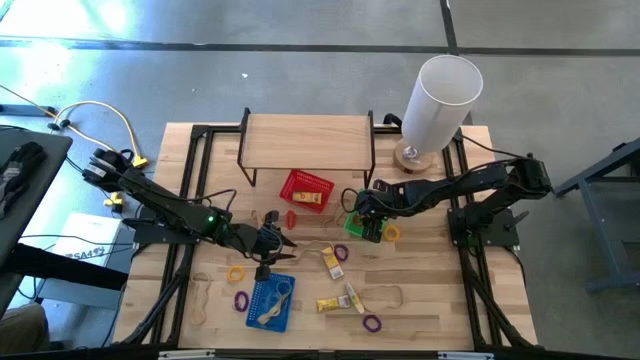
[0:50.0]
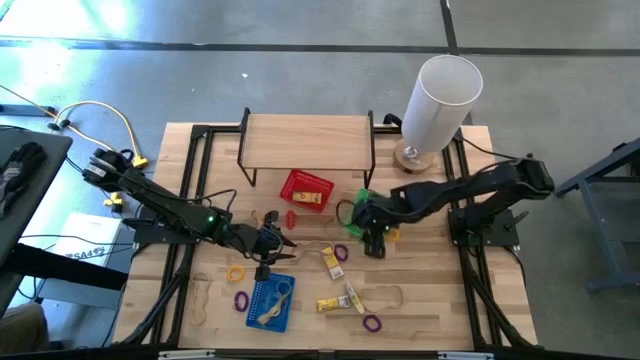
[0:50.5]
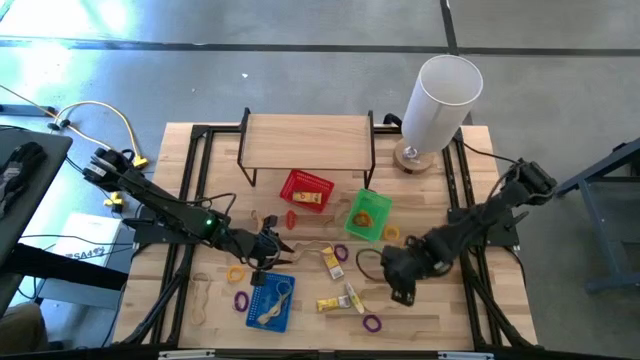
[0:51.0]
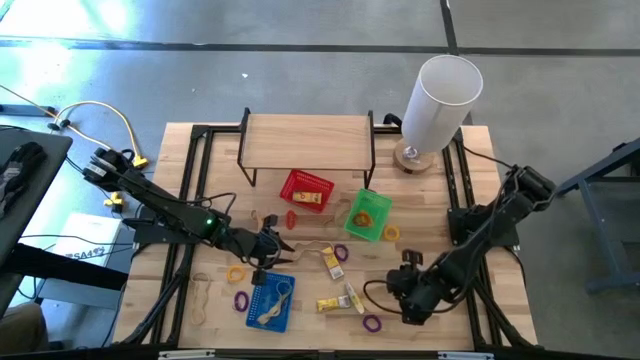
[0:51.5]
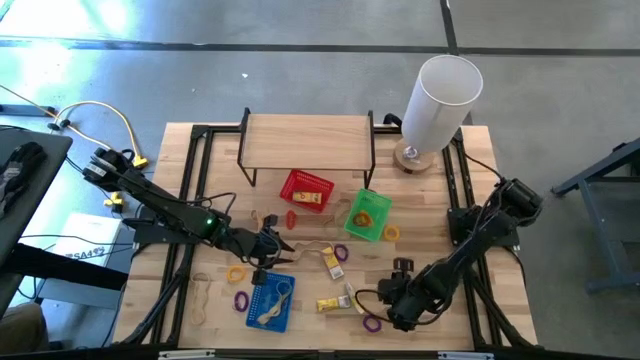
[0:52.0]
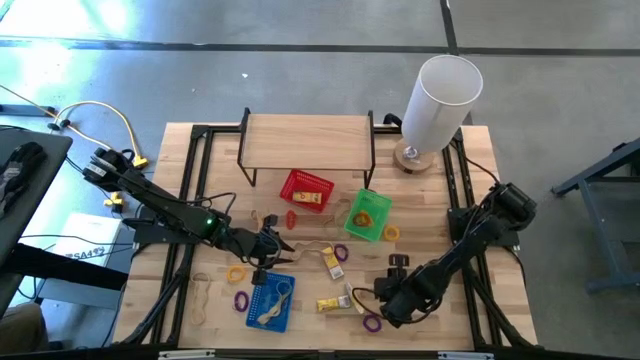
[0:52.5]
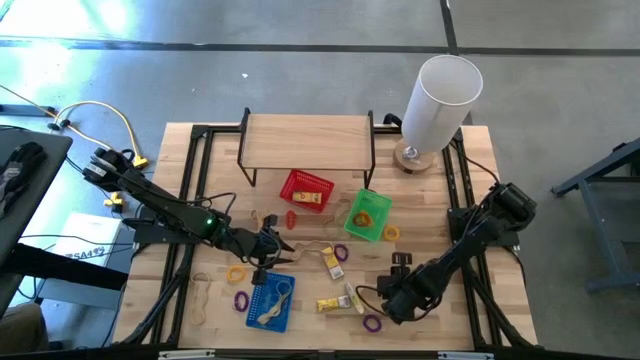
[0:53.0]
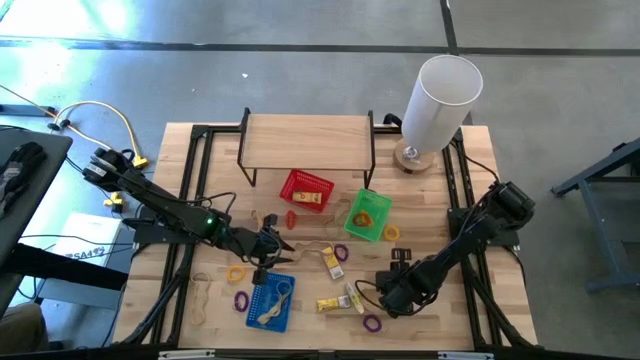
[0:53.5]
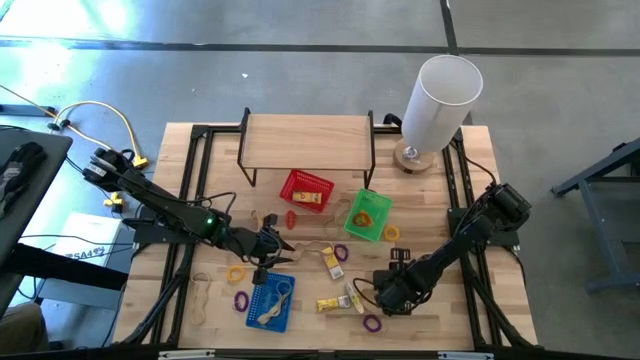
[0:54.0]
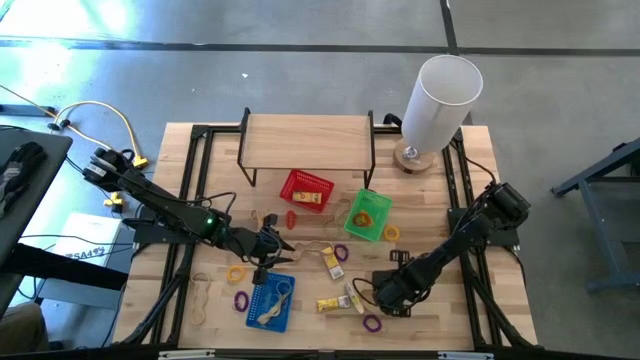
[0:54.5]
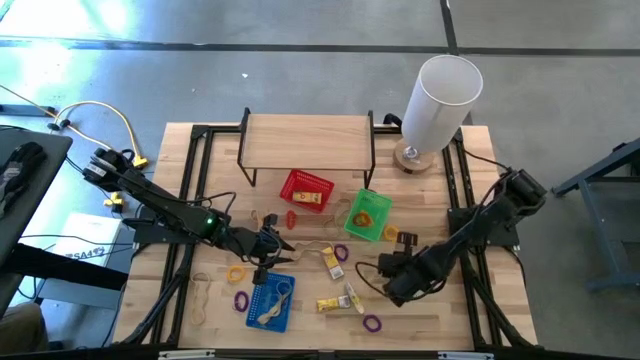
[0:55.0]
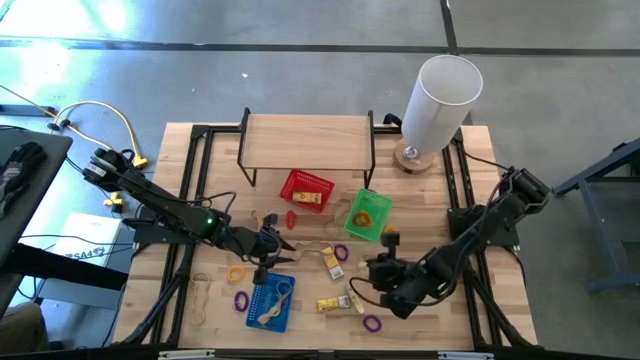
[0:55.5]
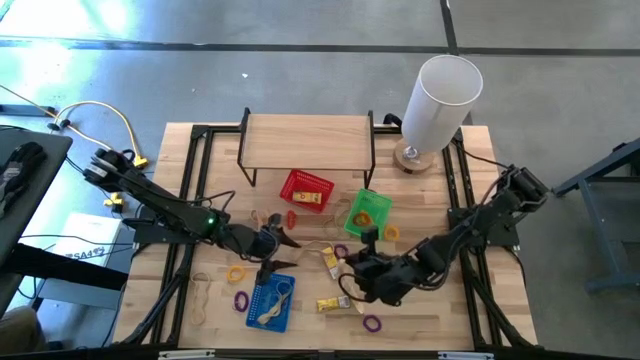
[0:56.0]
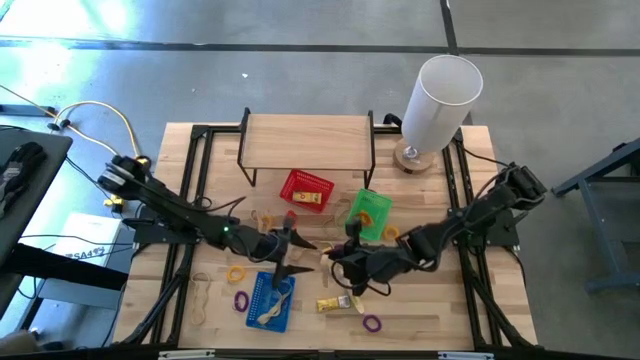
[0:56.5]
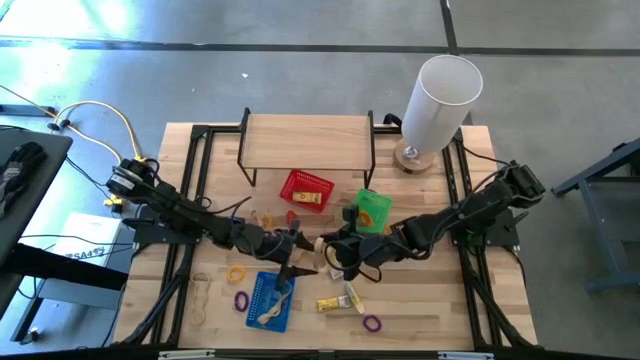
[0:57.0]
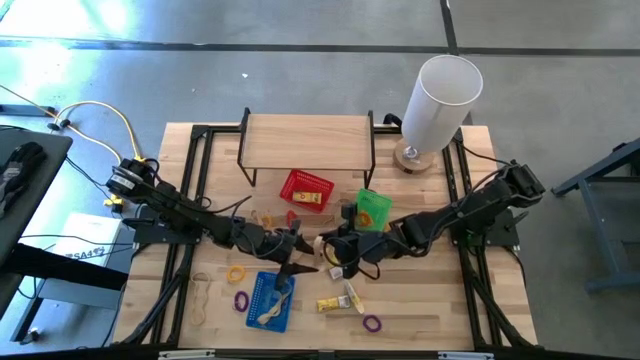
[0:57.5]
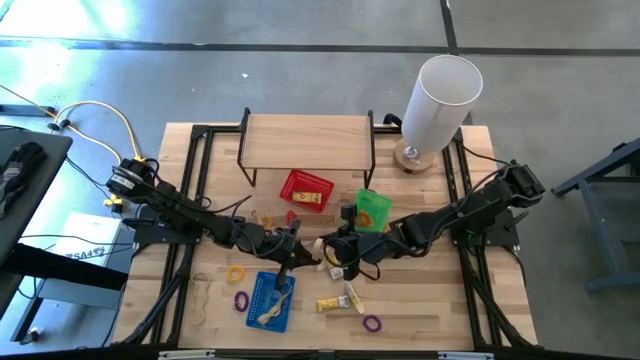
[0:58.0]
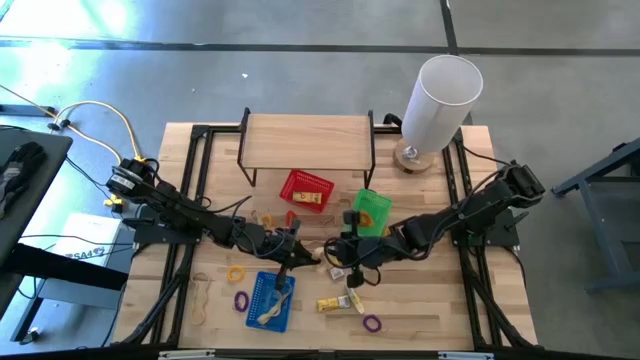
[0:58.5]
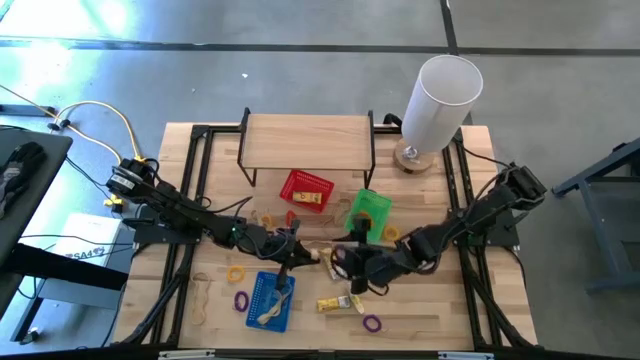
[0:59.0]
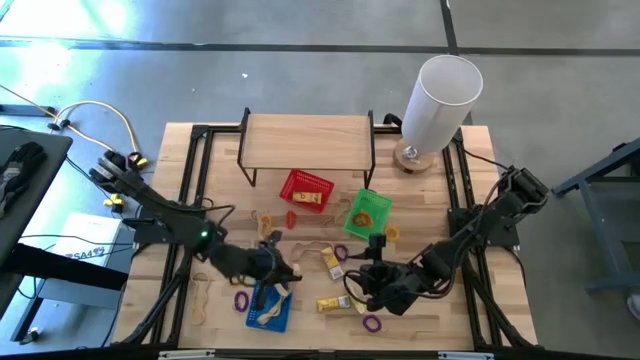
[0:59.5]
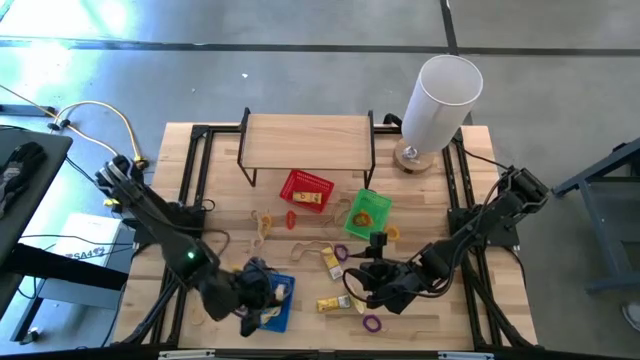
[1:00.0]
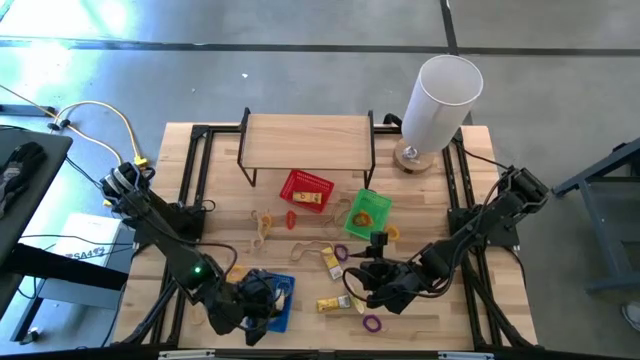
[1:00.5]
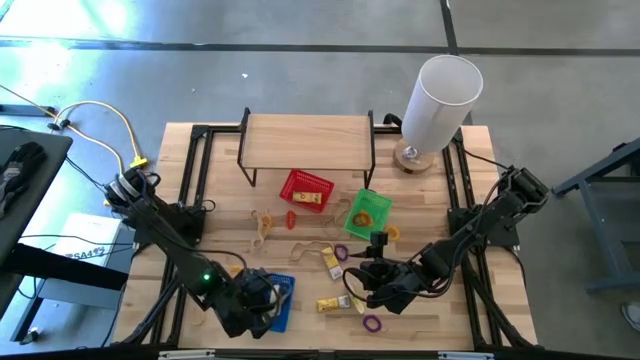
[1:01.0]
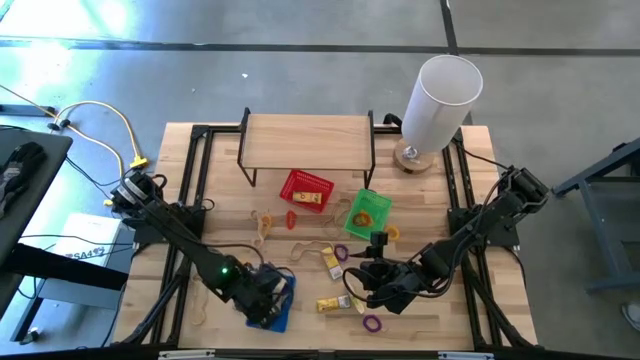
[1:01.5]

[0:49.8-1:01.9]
Task: Pick & Place Office Desk Supplies
Put the brown rubber band into the blue bin

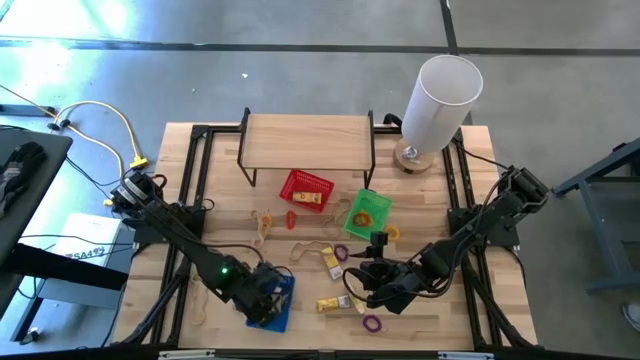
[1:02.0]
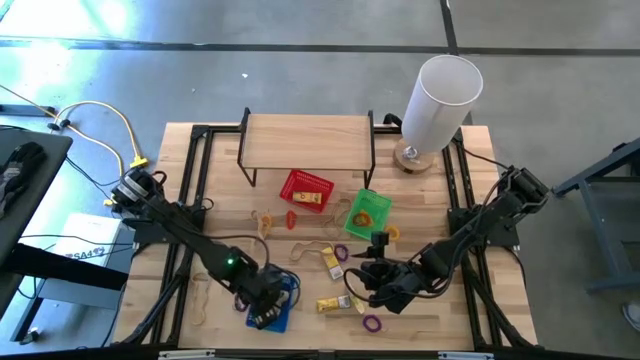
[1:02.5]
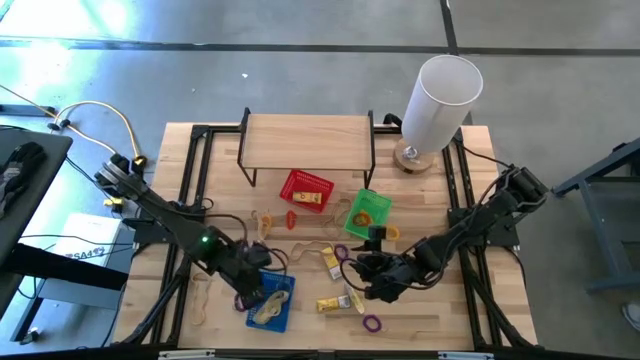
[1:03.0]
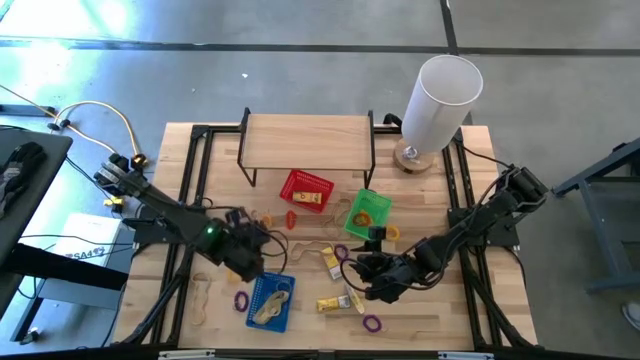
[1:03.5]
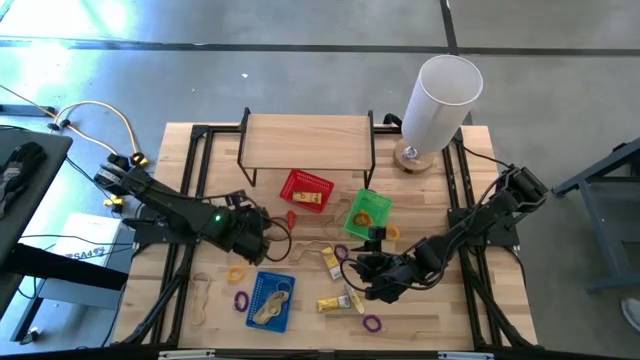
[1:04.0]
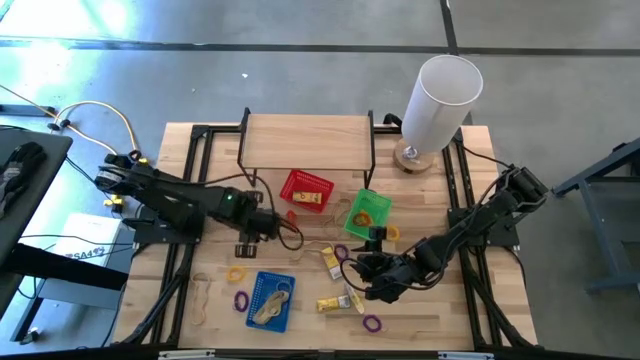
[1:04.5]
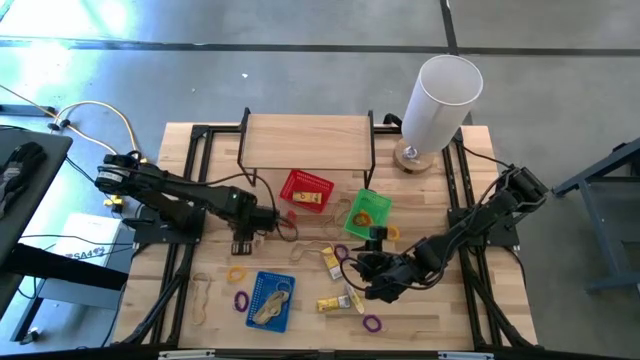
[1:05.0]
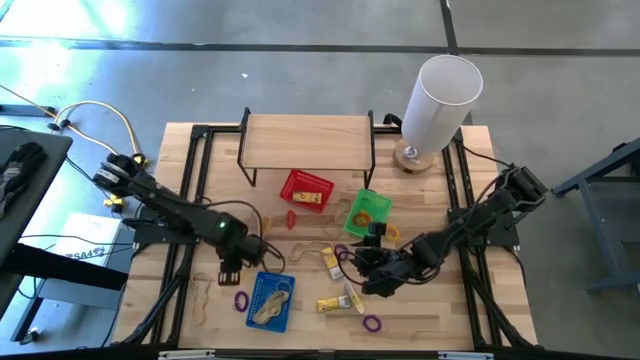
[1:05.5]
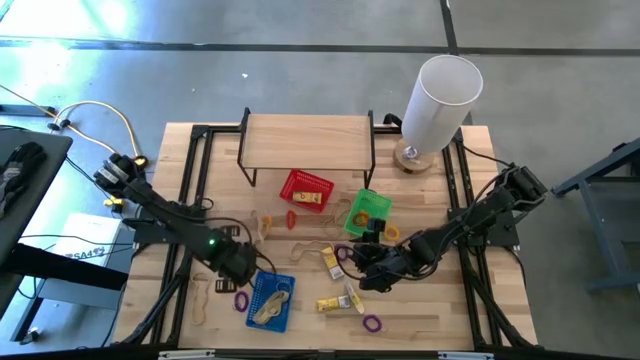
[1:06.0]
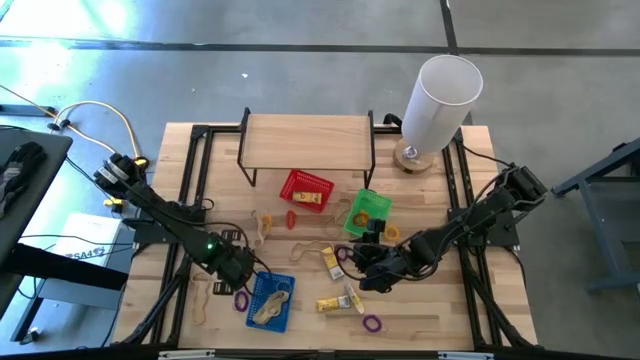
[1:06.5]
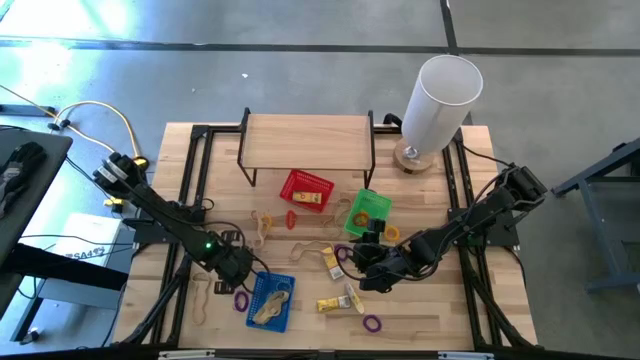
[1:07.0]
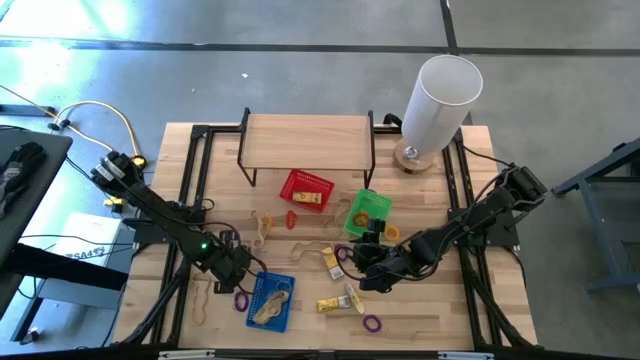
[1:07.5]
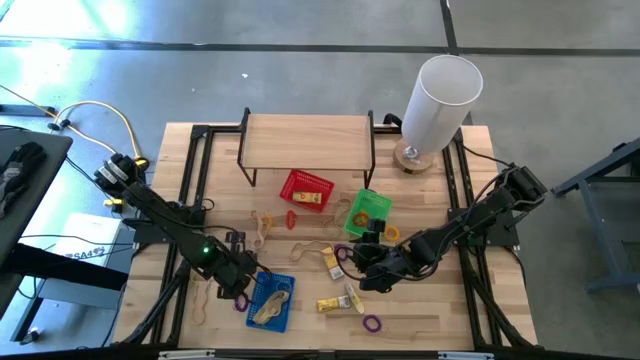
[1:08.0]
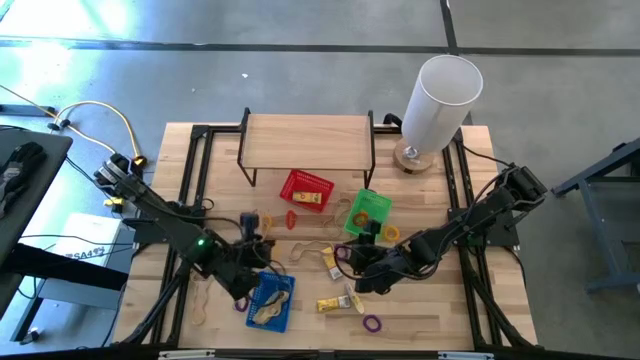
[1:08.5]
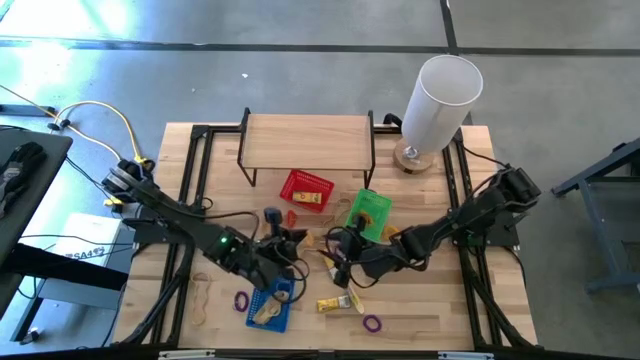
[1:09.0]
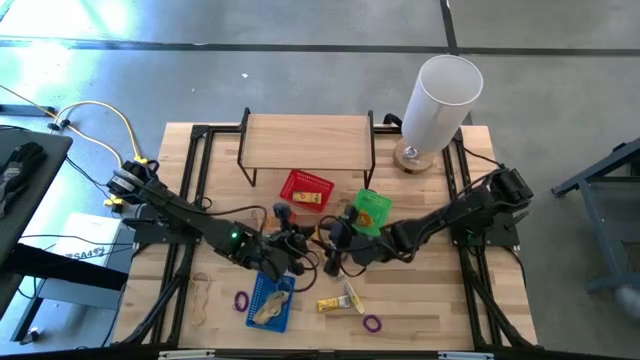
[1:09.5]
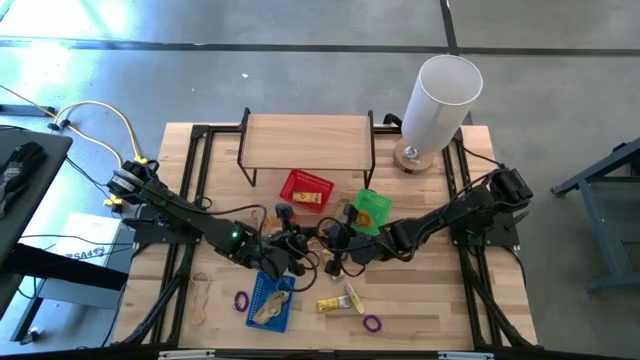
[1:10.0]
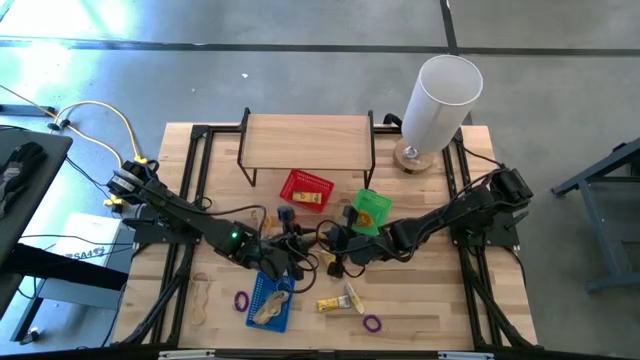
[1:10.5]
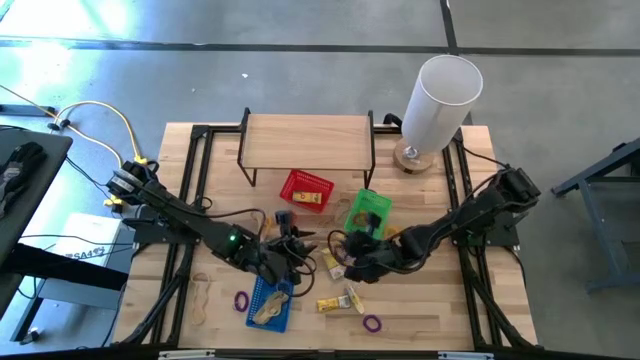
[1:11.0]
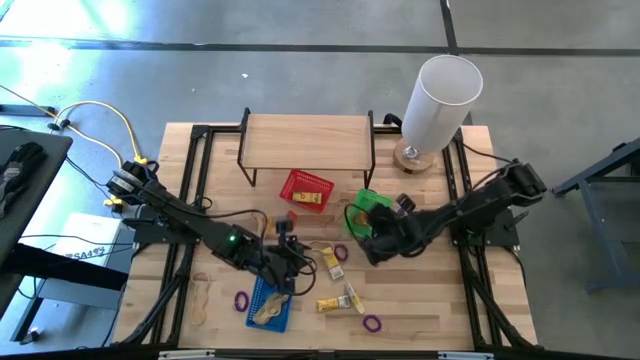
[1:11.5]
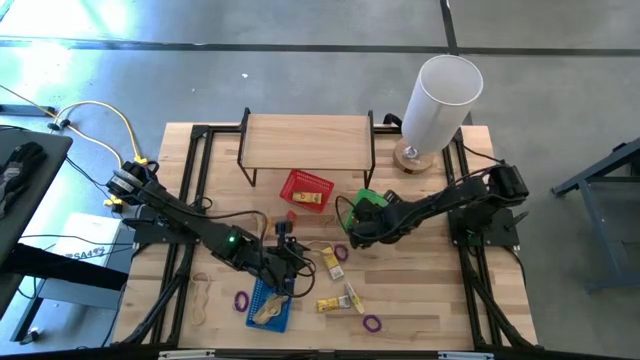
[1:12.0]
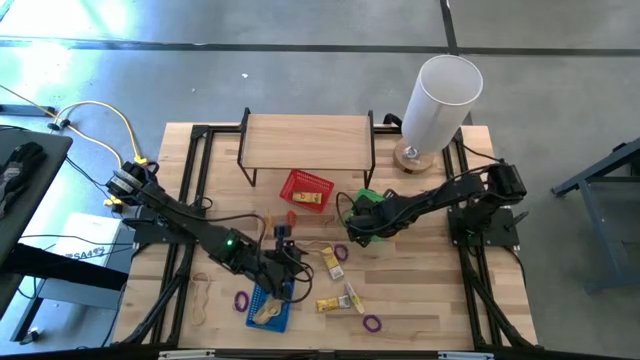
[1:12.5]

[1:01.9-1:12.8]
Put the yellow spring keychain into the green bin
